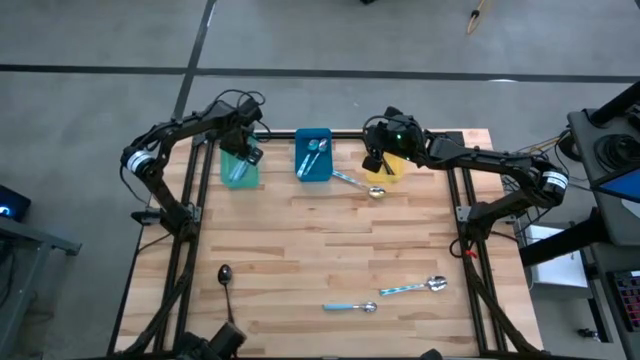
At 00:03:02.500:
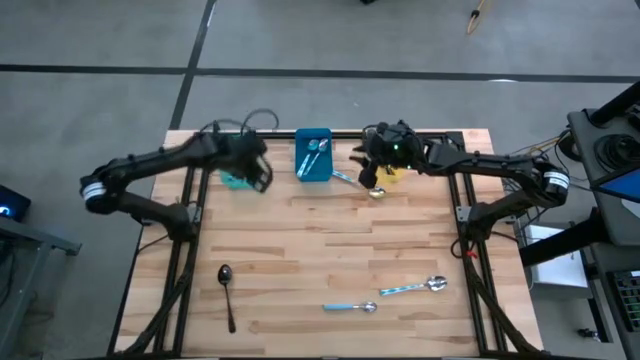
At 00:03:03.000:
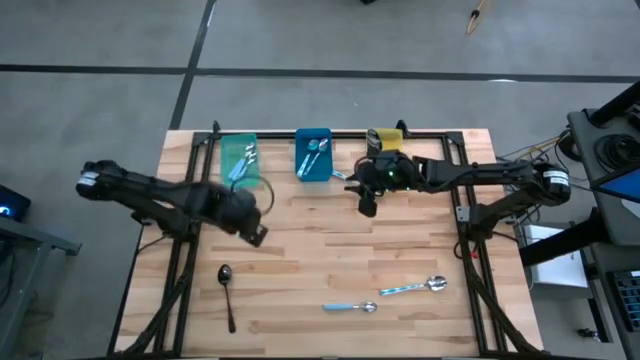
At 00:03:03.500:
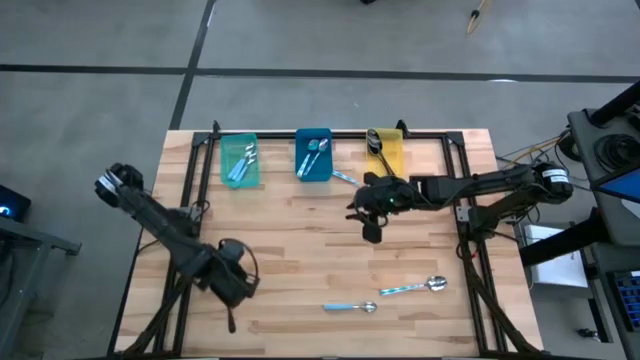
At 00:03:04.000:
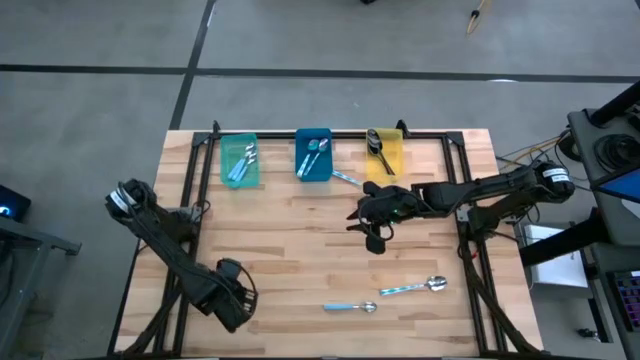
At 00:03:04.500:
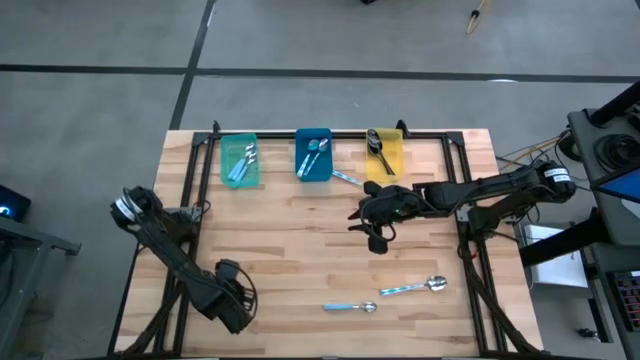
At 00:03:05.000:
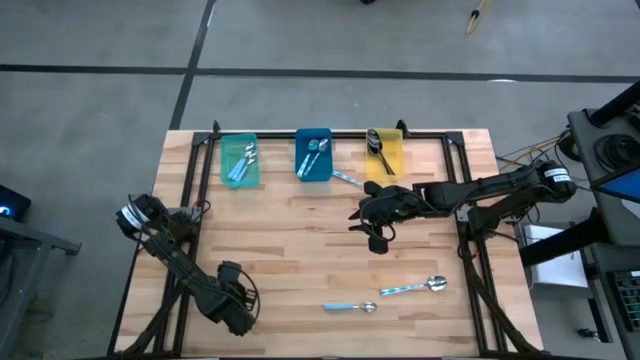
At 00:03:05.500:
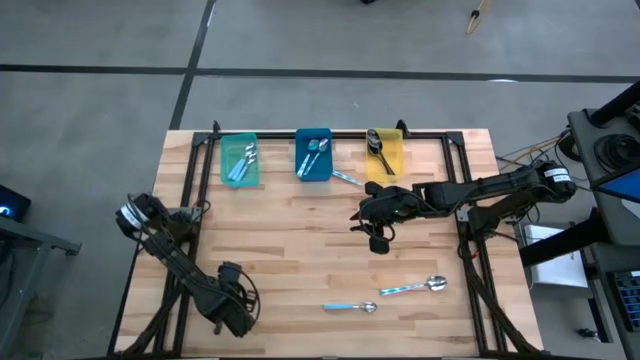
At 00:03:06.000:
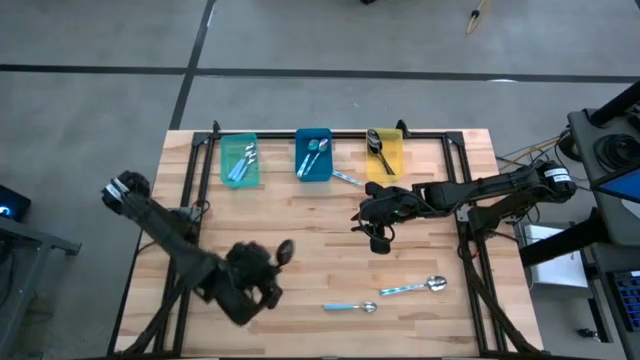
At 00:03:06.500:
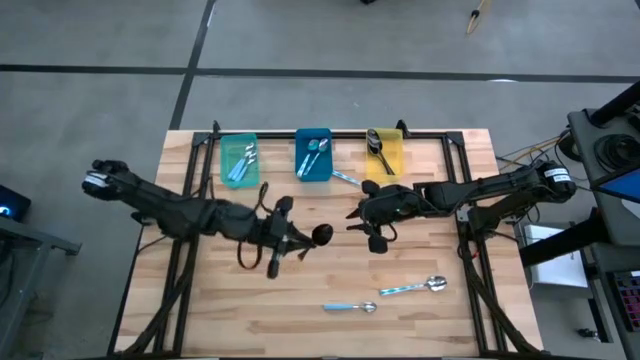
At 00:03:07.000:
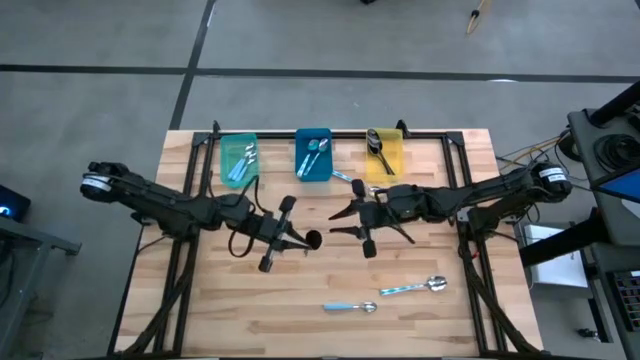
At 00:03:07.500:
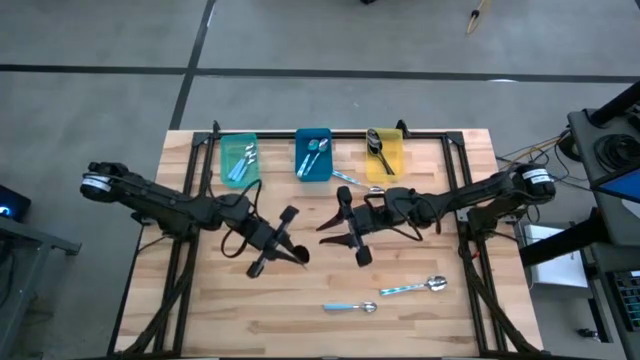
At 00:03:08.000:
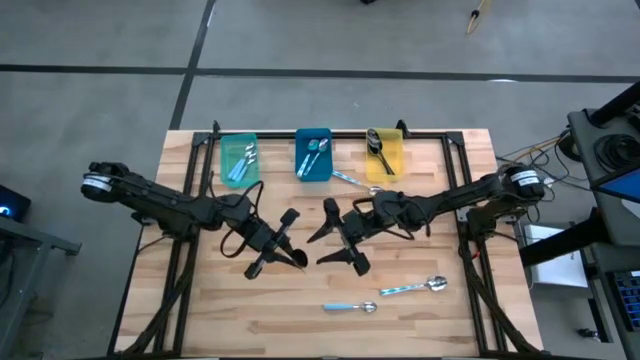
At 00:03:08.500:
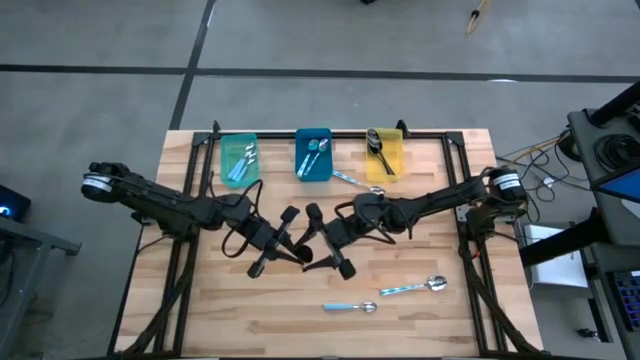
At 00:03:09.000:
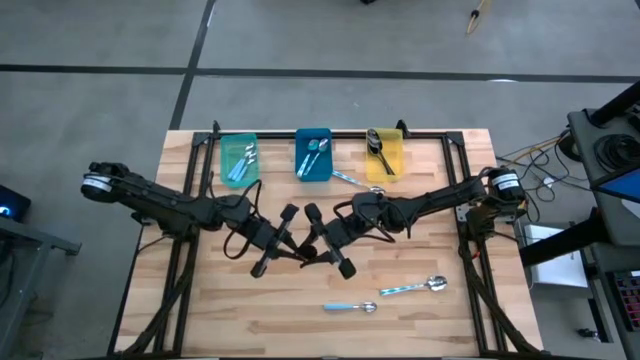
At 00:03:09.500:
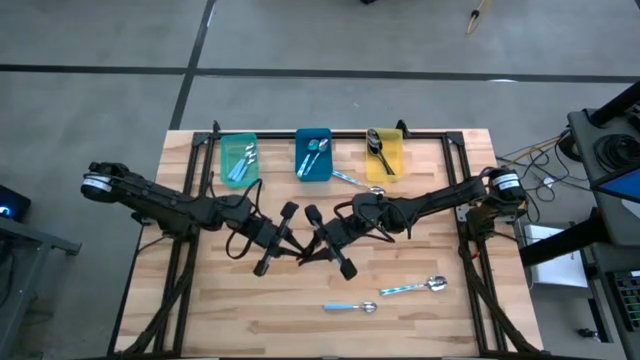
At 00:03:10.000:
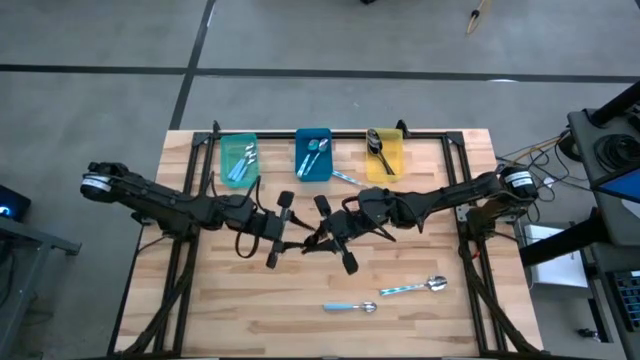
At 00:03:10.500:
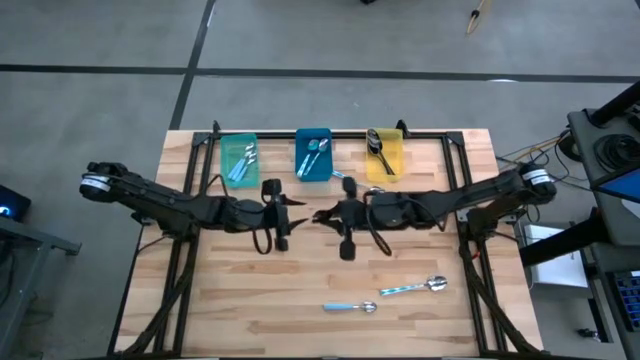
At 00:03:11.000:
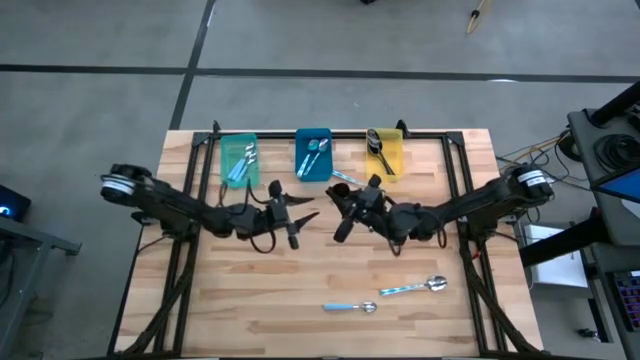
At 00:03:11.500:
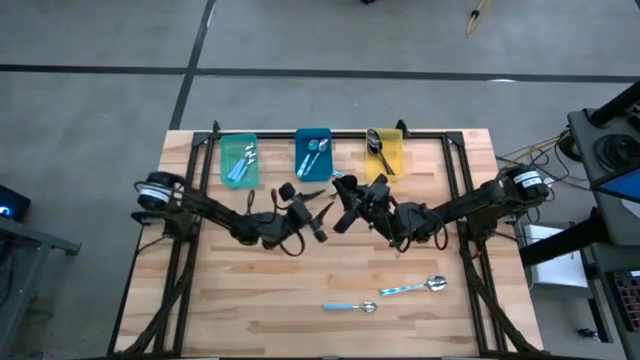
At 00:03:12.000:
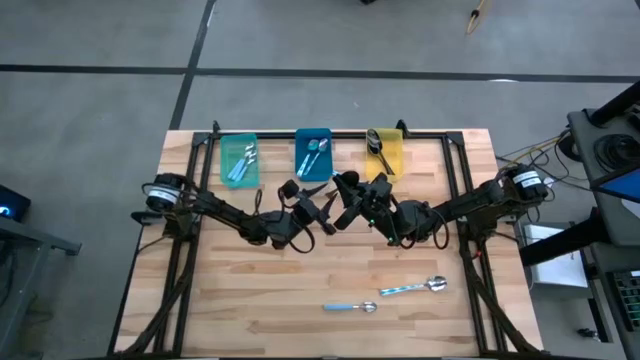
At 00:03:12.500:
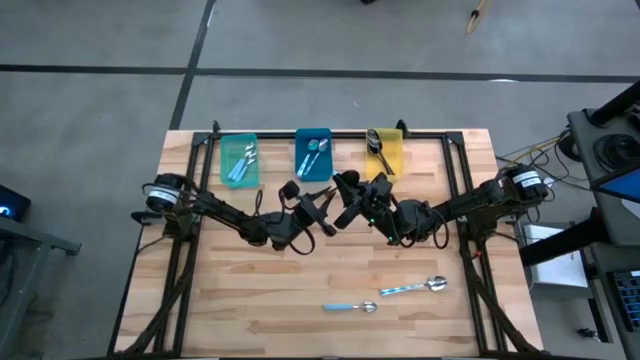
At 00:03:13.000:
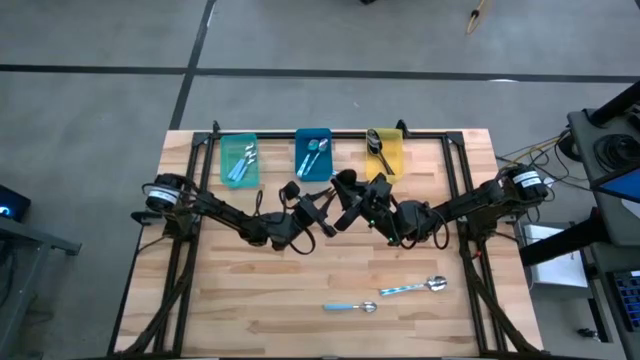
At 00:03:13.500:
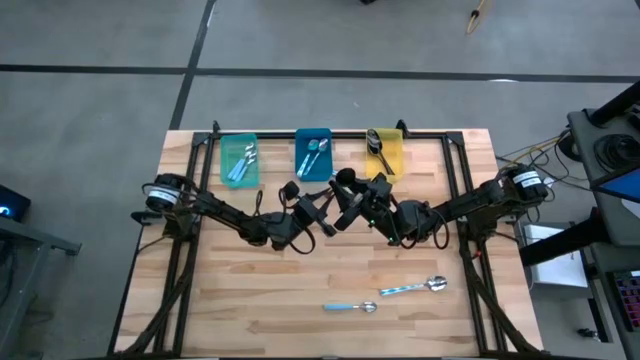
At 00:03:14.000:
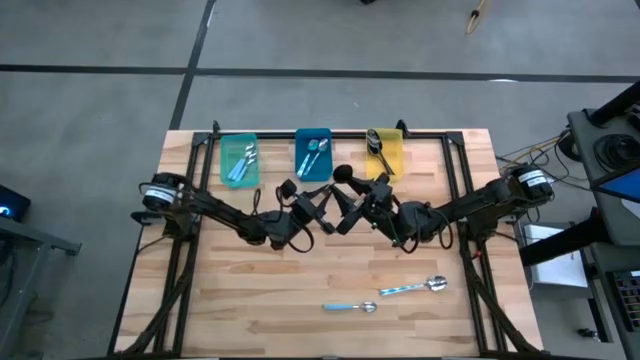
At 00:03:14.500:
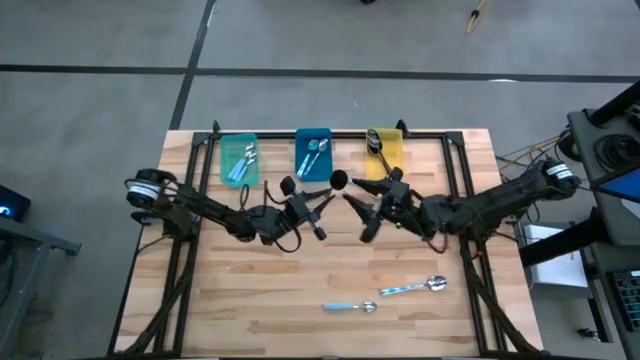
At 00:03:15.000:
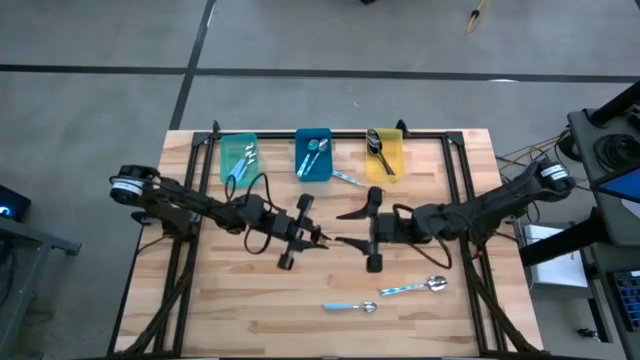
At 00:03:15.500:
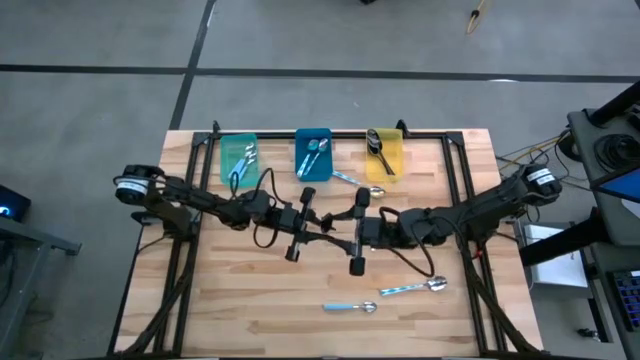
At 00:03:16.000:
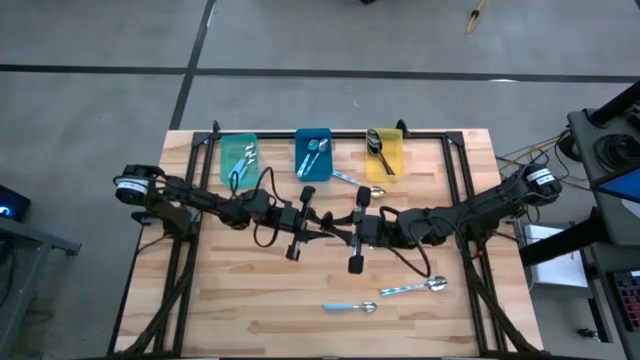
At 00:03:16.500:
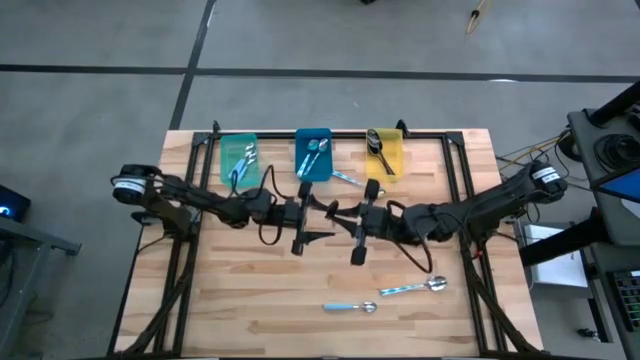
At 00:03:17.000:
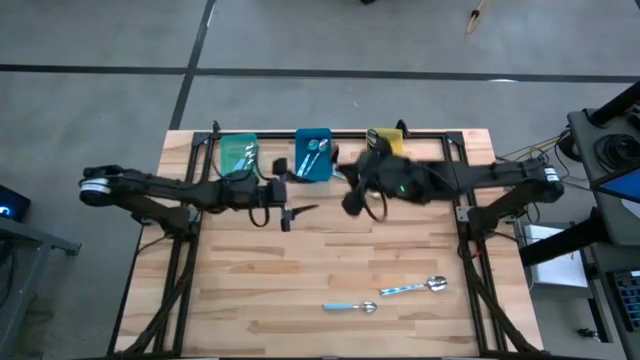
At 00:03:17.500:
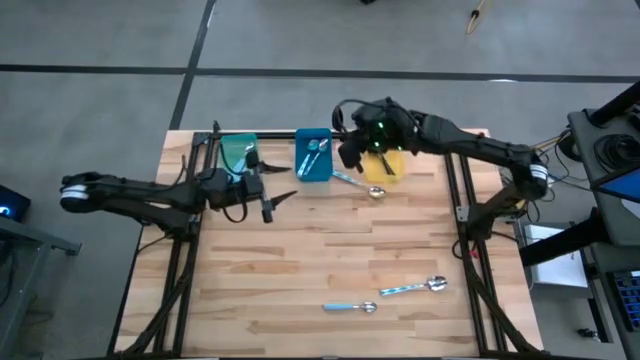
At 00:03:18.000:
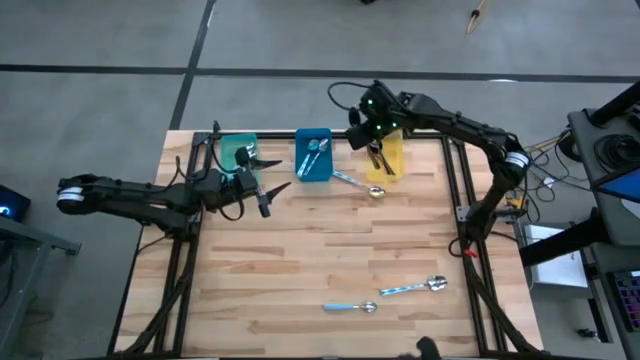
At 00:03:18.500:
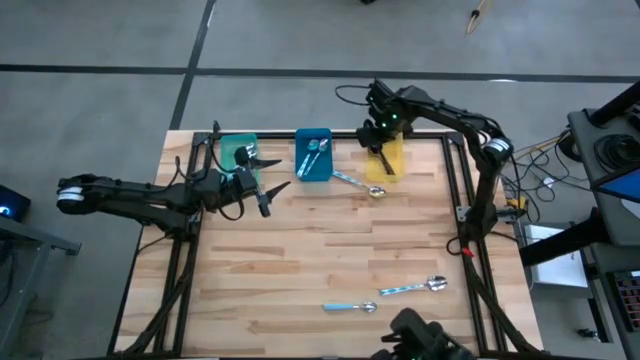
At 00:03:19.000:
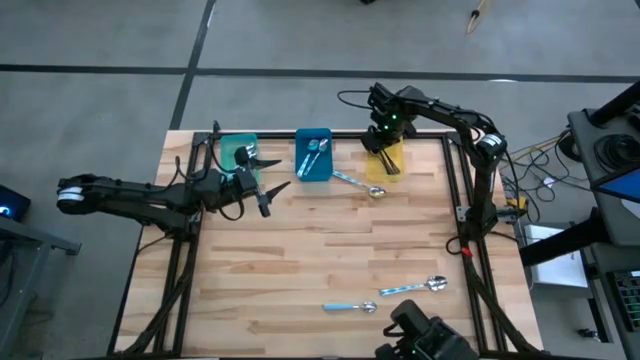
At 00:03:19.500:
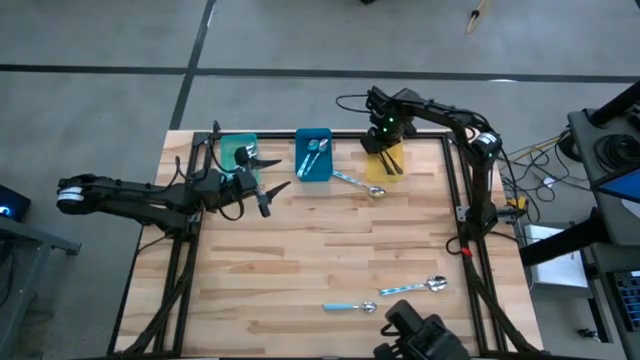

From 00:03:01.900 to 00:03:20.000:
Task: Sort silverware by color (type)
Put the black spoon into the yellow bin

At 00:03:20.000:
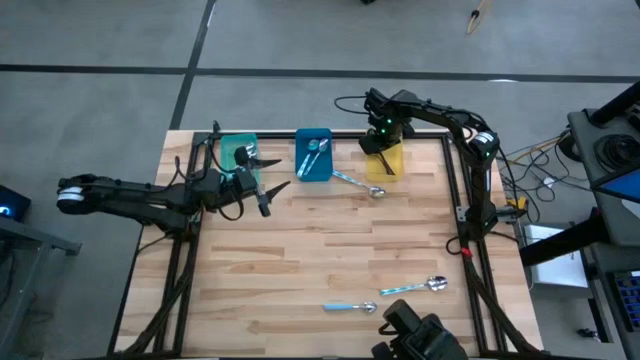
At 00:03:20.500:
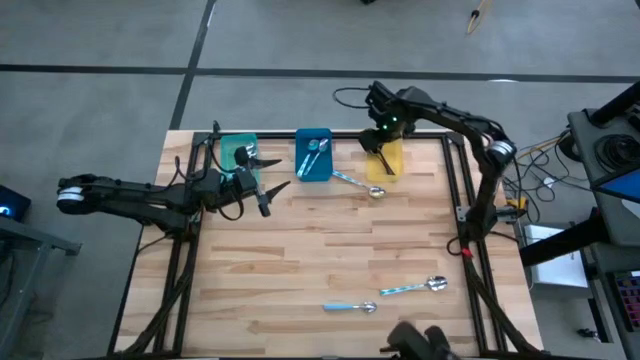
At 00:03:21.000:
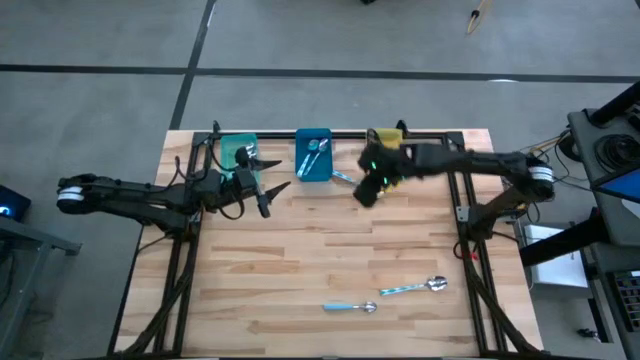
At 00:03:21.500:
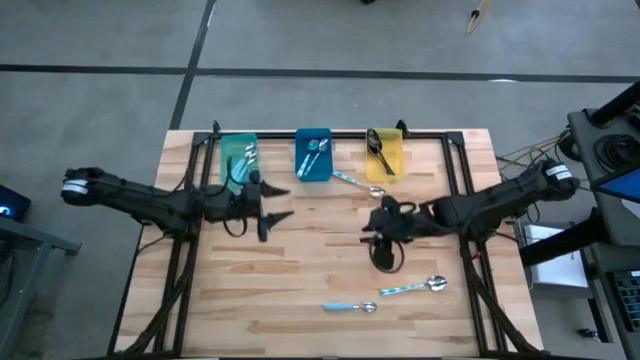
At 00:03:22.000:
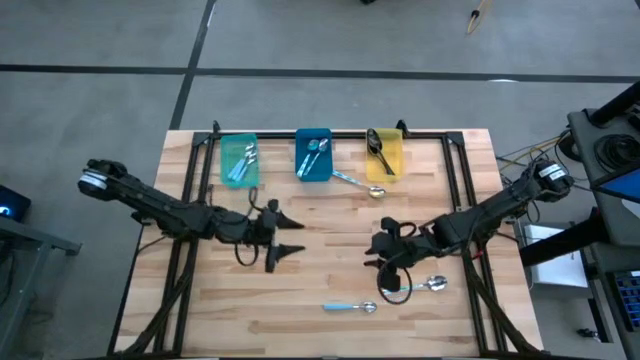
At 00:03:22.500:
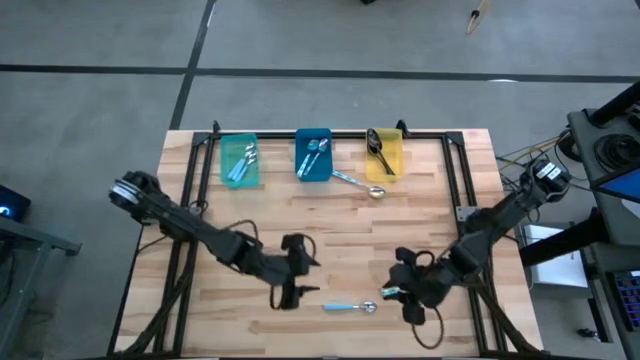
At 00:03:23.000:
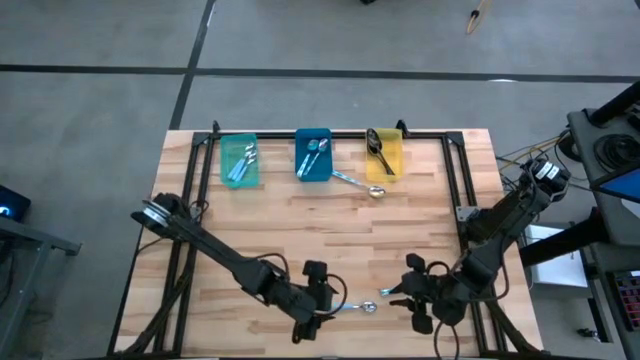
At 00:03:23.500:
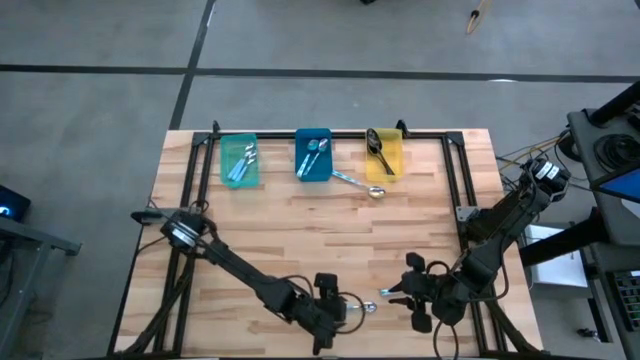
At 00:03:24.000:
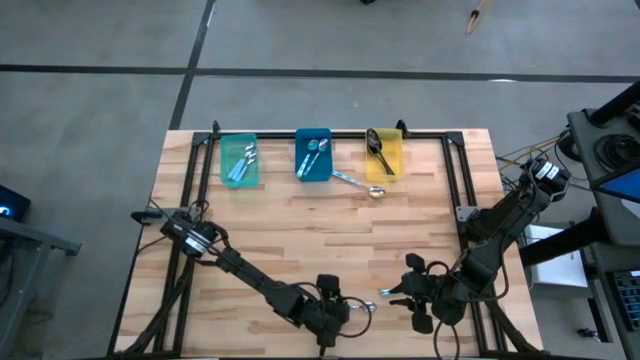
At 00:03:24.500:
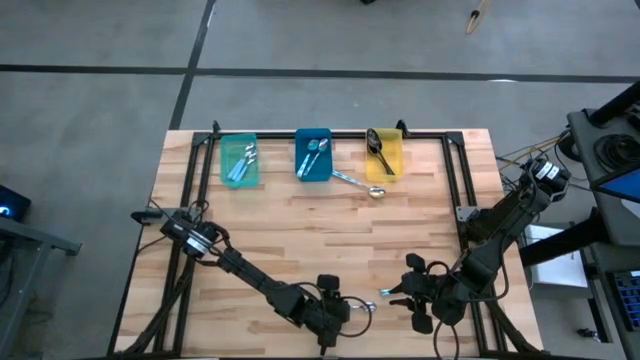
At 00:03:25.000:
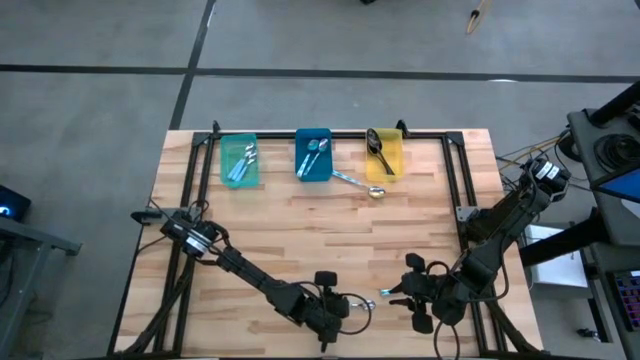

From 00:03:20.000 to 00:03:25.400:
Put the blue spoon into the green bin
